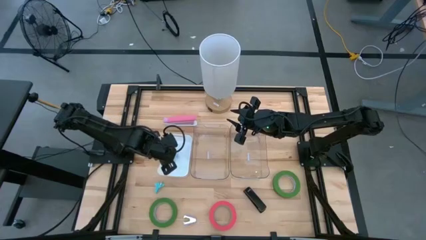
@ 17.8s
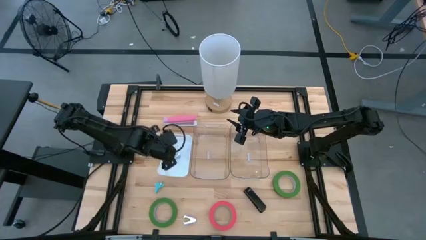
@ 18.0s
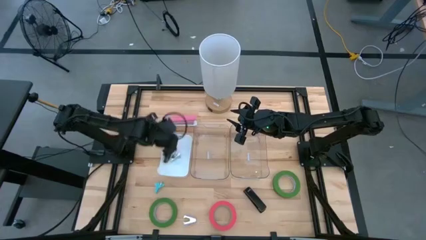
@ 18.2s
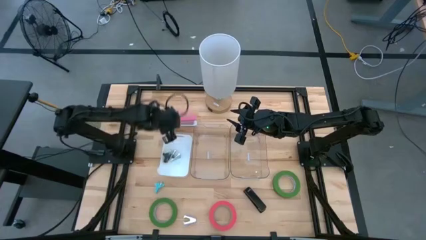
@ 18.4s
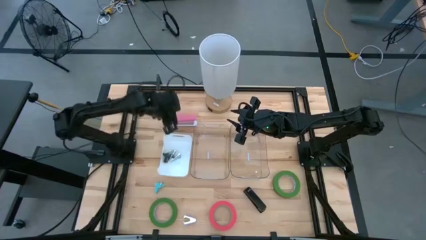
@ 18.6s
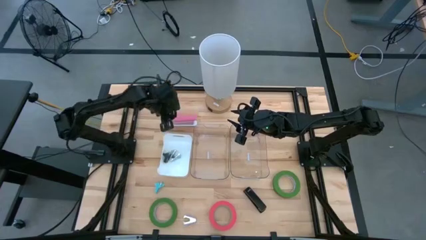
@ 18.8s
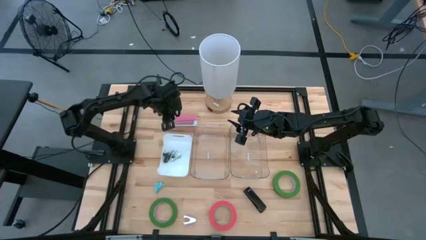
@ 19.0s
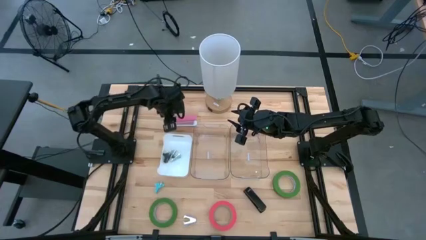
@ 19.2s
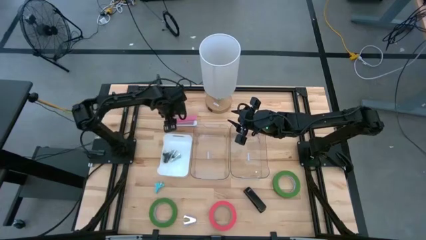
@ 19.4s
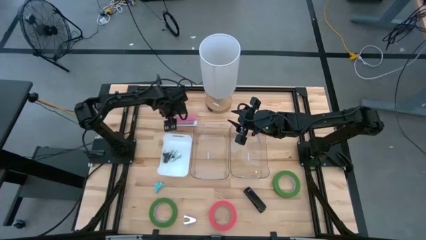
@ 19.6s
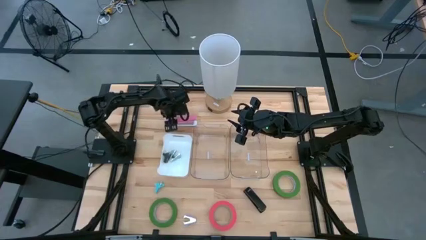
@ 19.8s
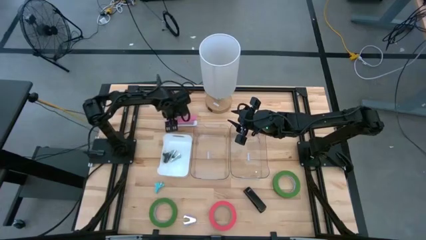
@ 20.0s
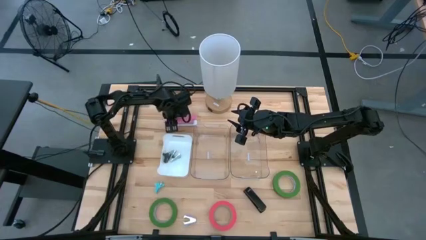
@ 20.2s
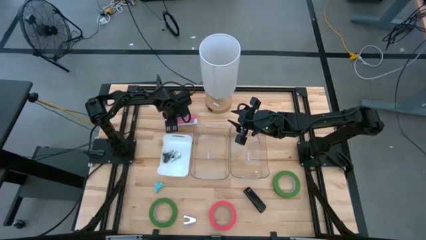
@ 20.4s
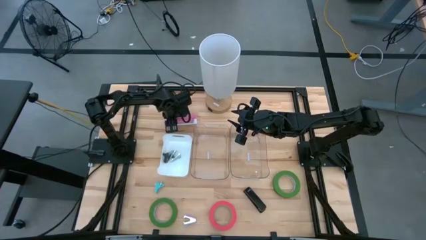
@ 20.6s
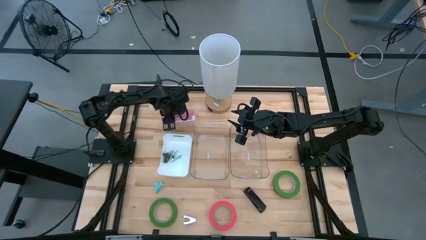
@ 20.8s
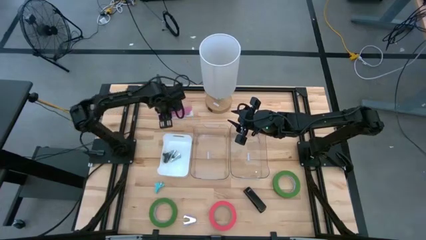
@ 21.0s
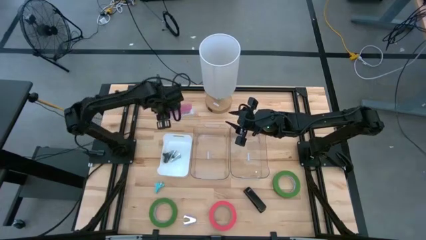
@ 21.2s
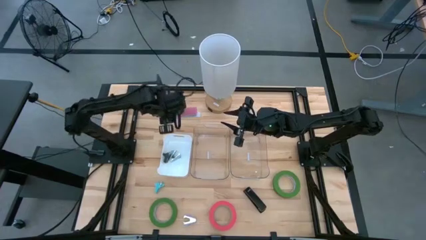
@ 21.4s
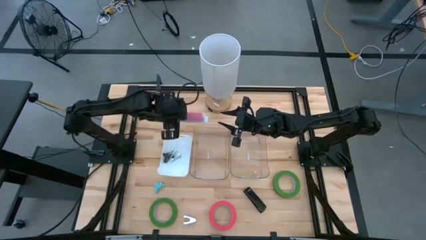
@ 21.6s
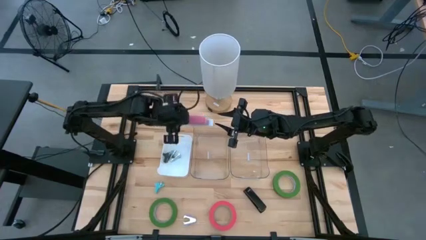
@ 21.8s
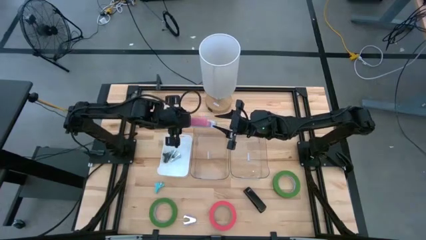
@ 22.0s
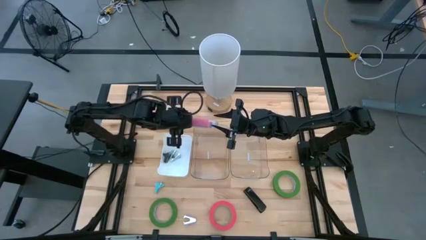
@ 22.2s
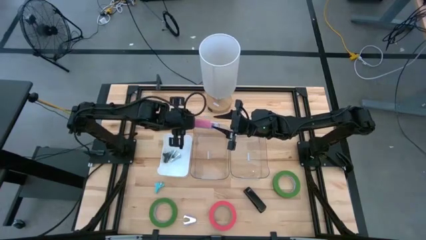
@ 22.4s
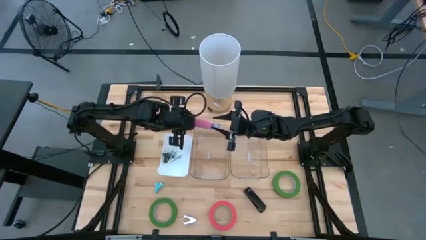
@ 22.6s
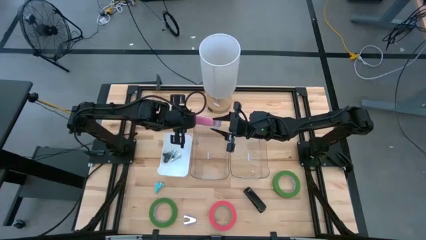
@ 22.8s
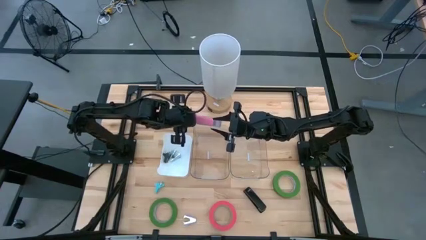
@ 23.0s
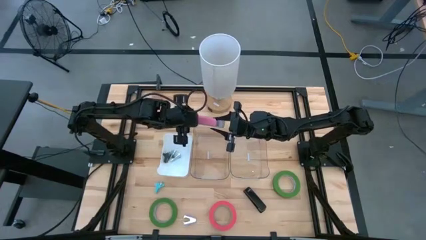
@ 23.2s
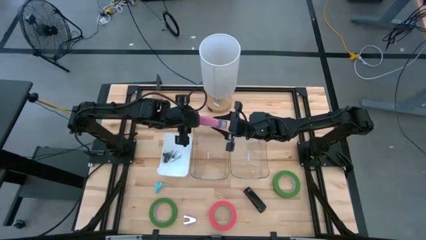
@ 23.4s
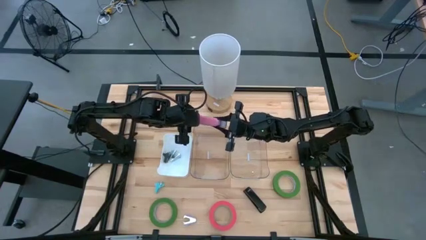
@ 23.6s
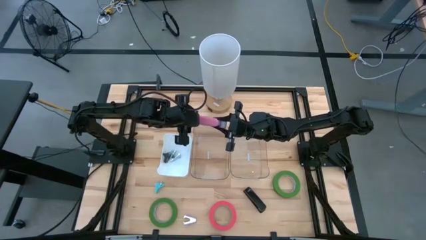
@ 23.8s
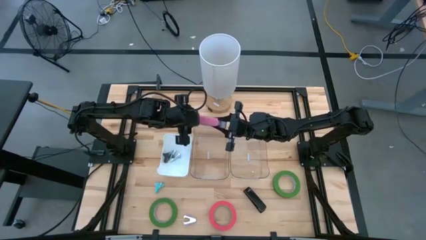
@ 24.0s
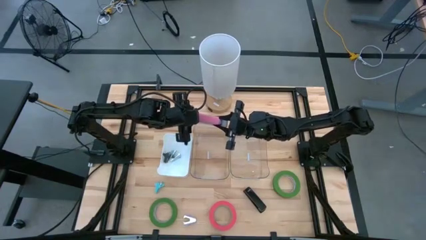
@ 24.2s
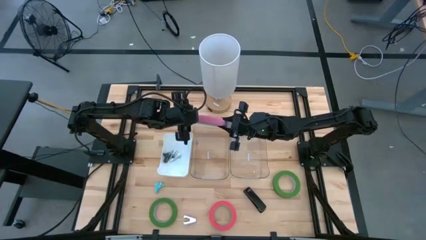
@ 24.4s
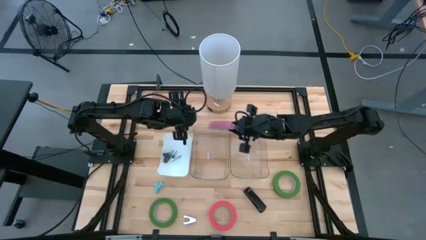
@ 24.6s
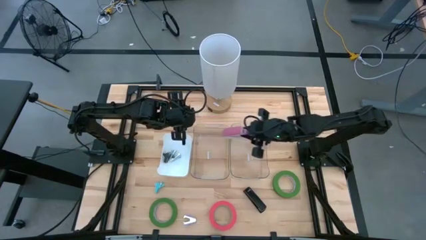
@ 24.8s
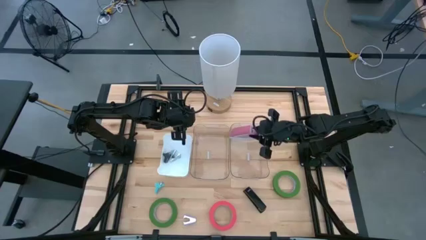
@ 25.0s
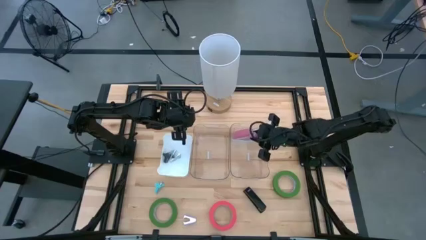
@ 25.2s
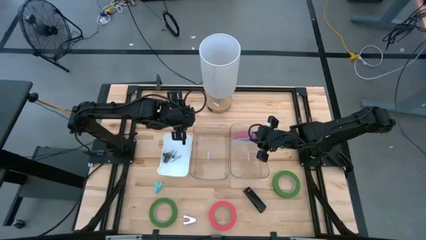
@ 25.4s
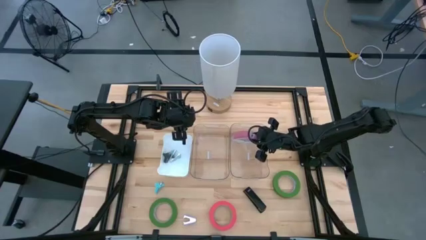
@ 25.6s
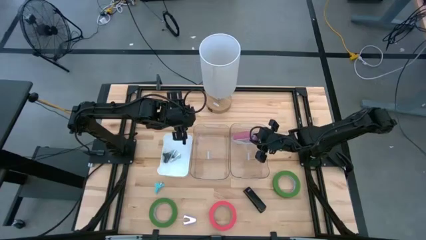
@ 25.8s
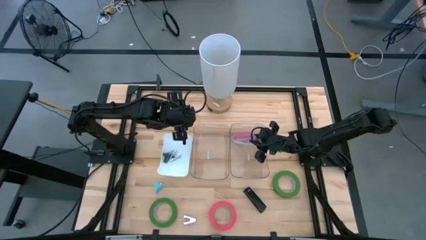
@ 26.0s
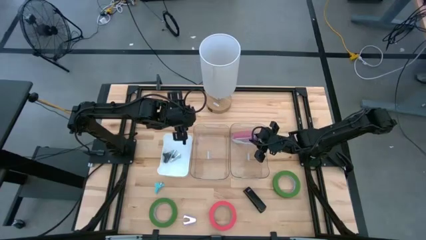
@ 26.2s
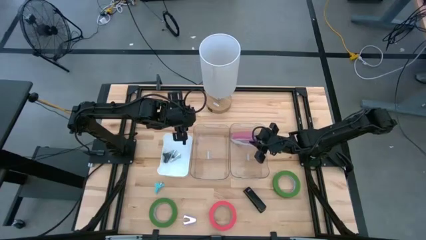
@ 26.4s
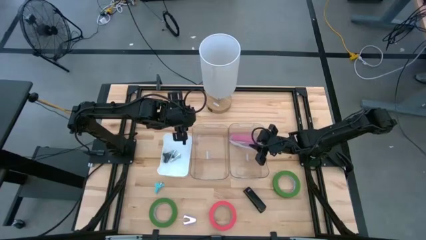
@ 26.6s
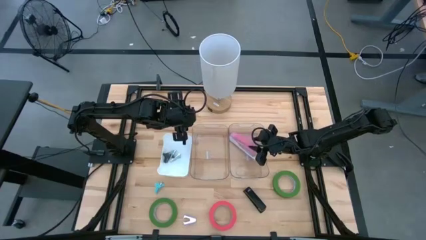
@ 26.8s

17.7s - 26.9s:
Task: Pick and place Stapler, Stapler remover, tape
Put the pink stapler into the right transparent bin

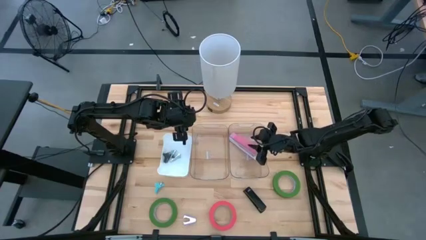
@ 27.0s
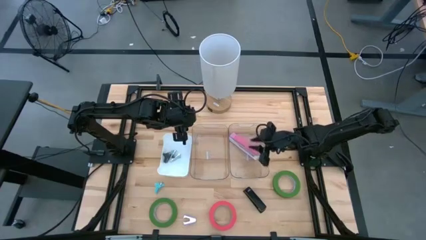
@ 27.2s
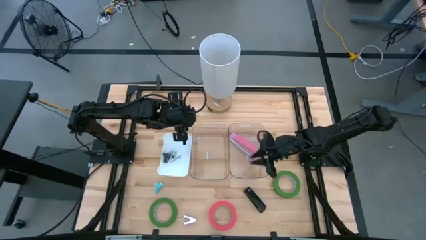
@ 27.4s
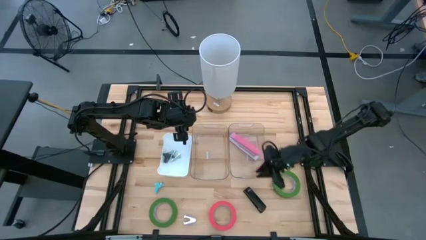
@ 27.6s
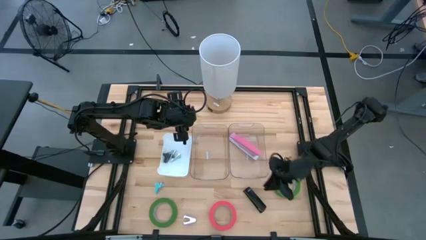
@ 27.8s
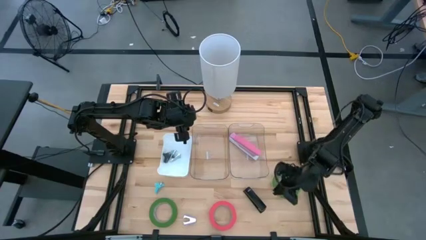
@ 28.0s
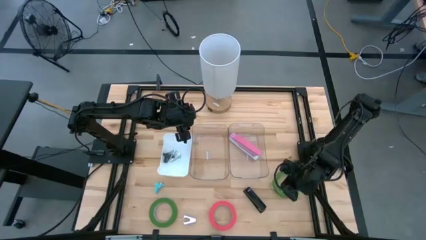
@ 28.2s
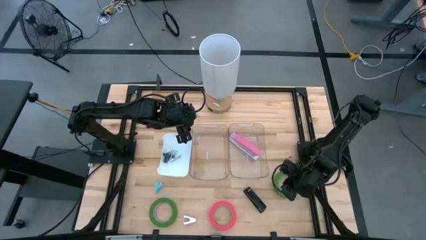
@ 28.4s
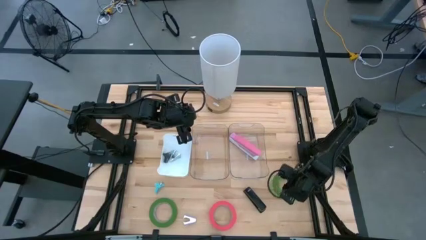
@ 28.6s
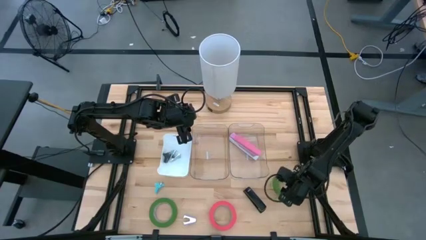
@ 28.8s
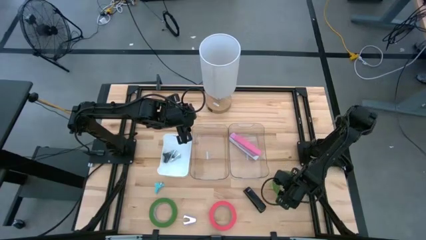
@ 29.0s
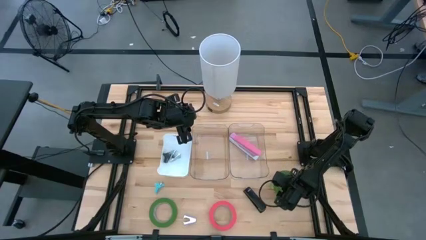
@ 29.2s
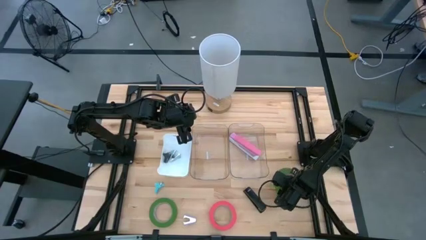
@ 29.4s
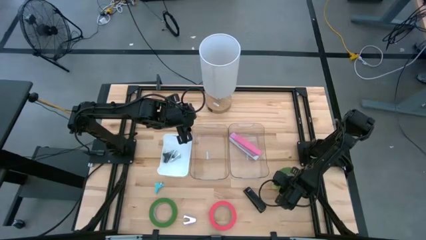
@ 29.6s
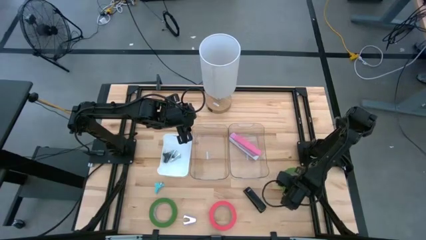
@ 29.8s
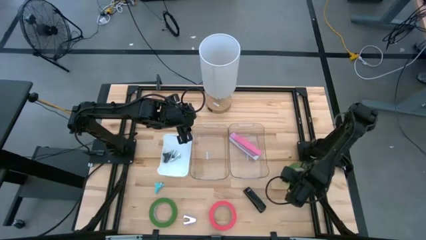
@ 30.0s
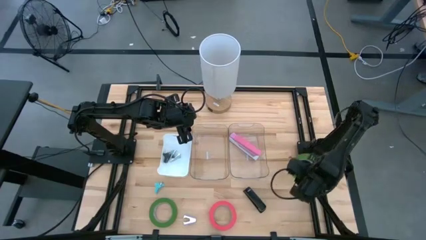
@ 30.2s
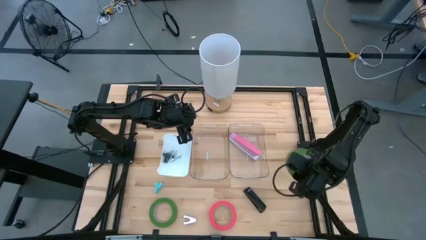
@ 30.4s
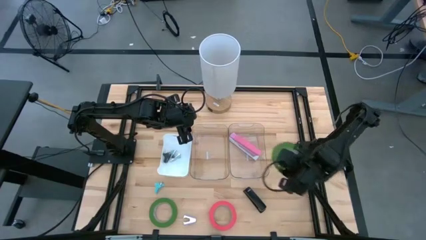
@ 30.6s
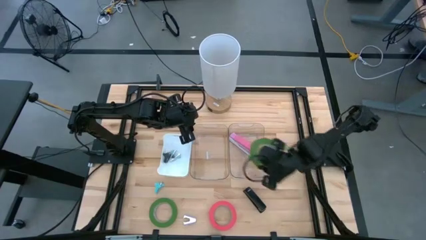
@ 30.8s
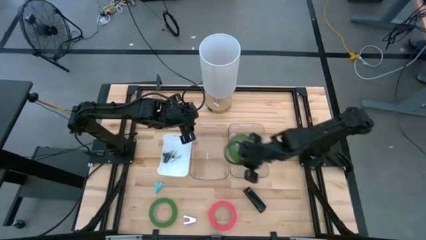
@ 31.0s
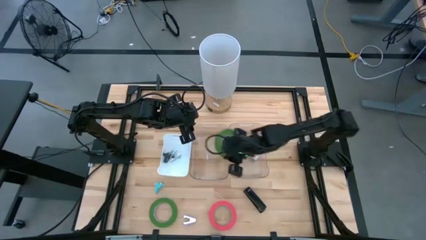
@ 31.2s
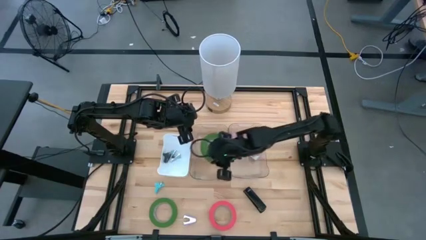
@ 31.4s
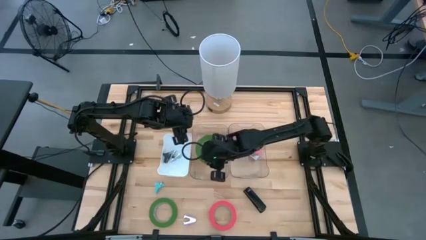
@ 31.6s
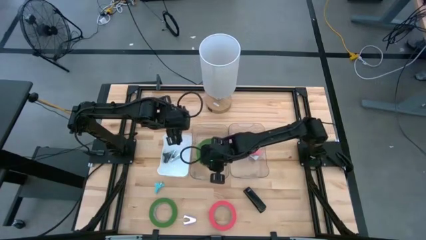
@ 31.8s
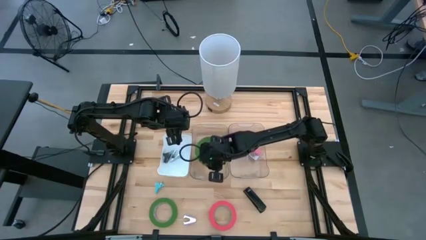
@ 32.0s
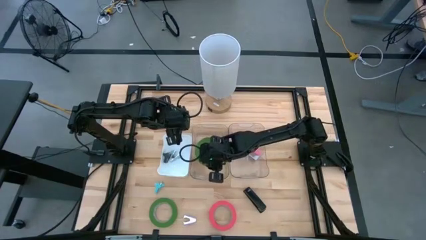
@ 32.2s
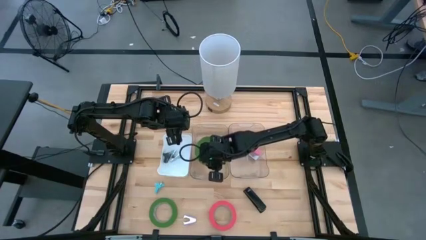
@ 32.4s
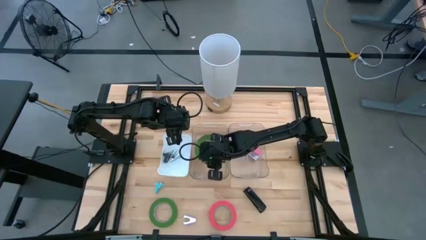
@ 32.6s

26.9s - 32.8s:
Put the top right green tape into the left transparent bin

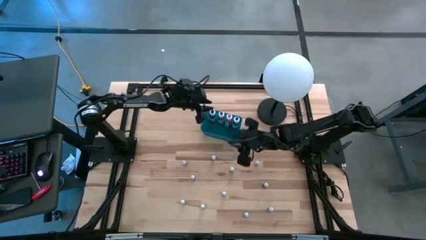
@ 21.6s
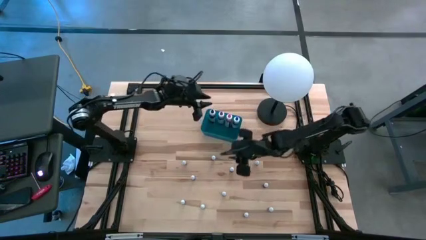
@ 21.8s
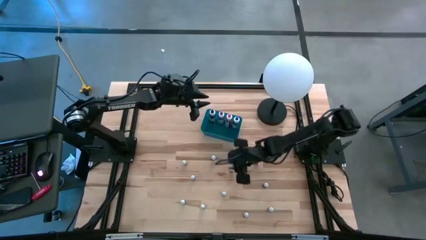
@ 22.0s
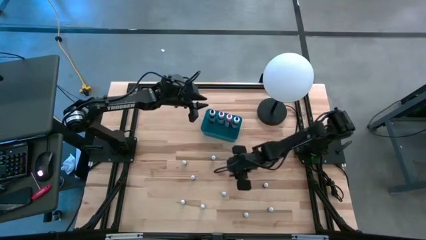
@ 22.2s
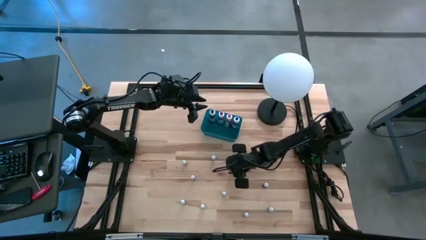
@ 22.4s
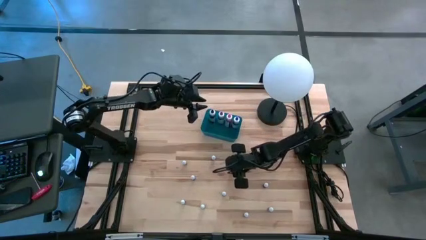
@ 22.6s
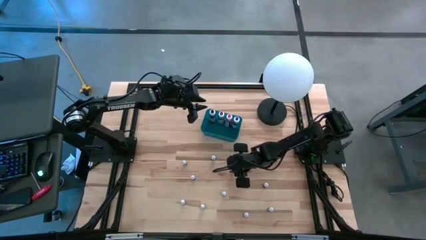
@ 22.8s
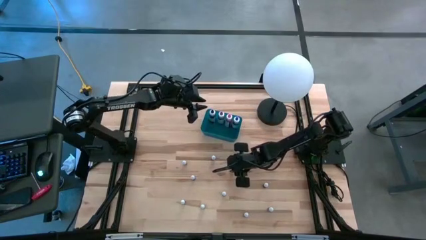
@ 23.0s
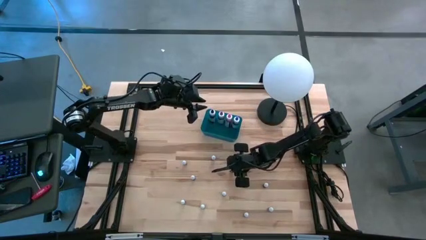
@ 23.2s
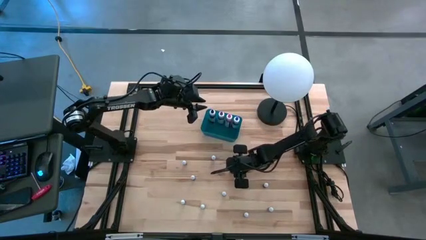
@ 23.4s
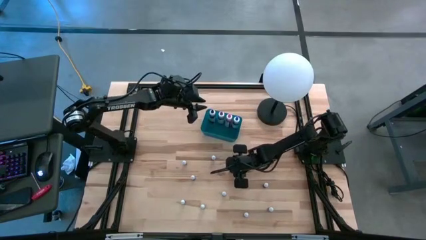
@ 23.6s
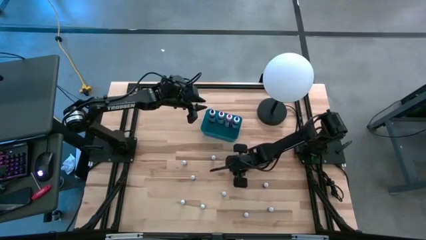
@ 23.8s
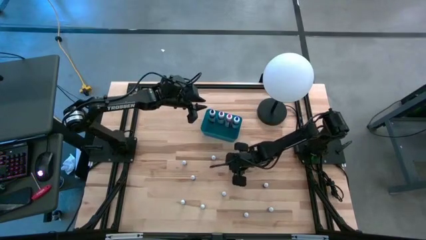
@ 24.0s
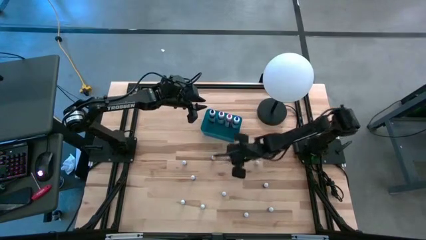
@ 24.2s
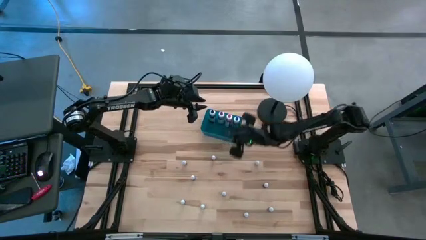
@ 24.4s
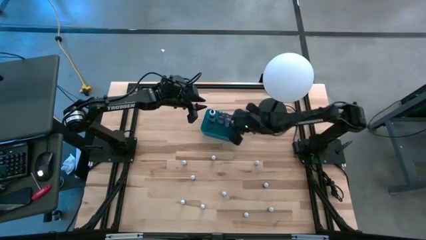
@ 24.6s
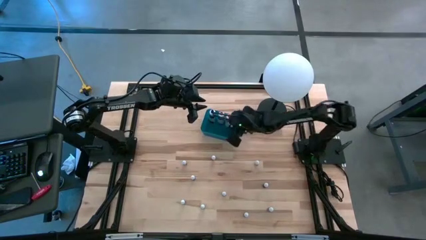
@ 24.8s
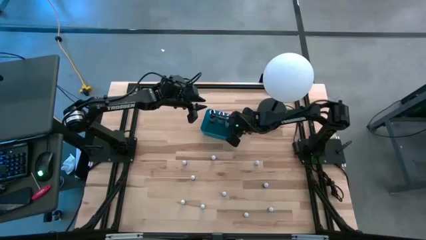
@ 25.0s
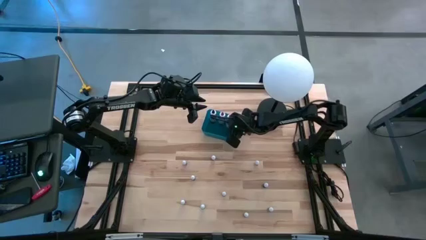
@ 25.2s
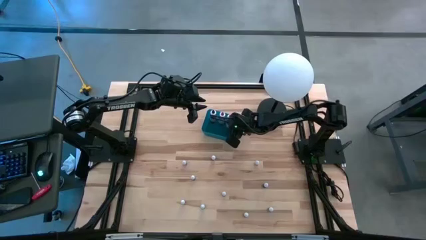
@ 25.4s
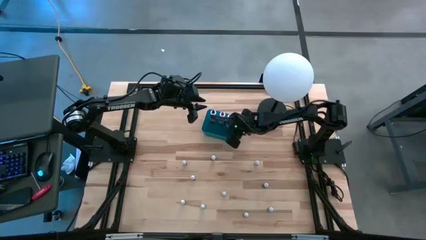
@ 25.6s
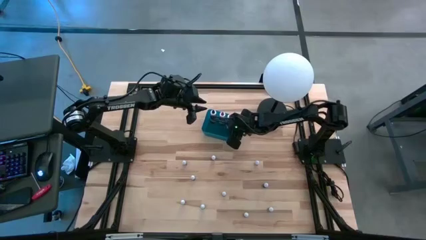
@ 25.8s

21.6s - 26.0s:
Task: Pick & Place food coloring
Put the small orange food coloring bottle into the blue bin
